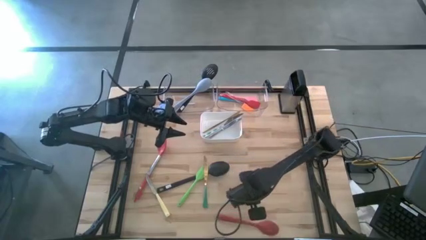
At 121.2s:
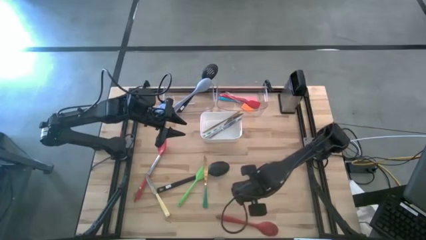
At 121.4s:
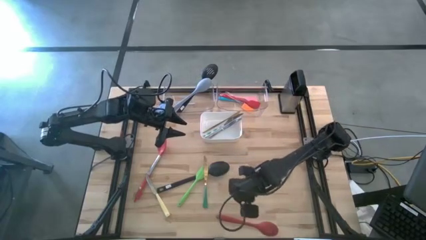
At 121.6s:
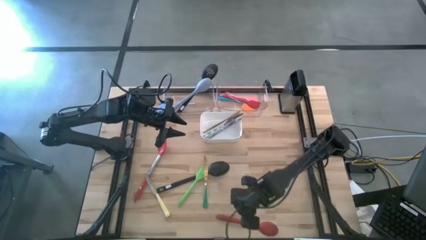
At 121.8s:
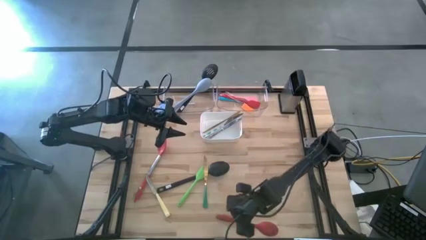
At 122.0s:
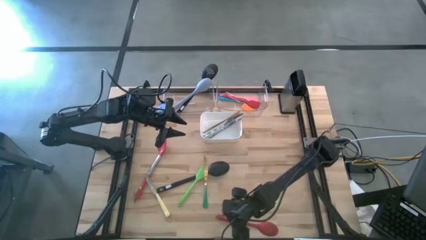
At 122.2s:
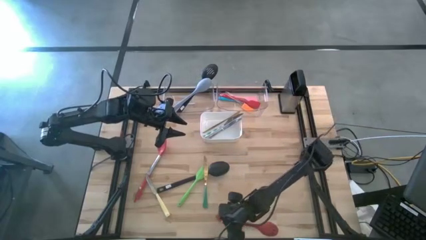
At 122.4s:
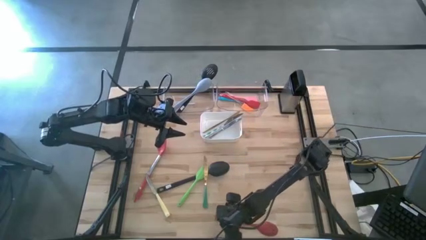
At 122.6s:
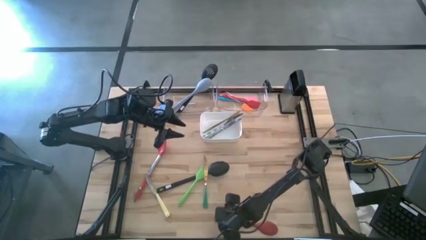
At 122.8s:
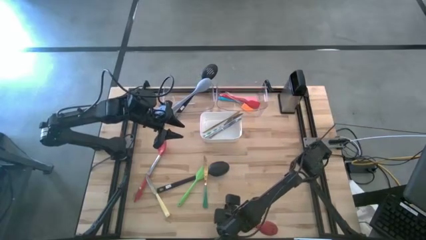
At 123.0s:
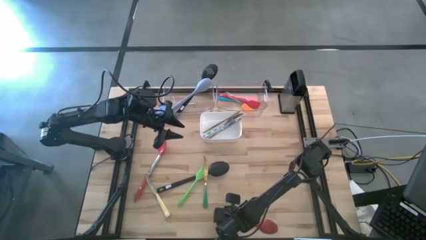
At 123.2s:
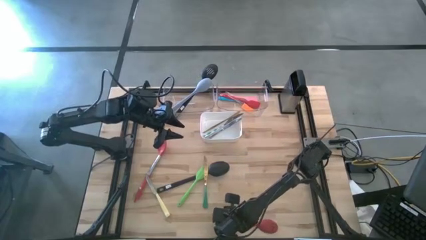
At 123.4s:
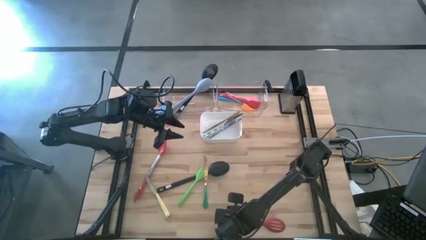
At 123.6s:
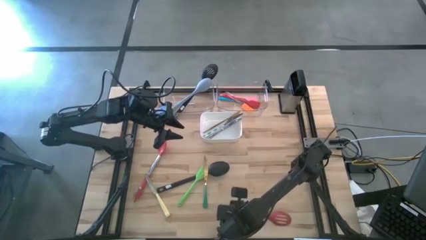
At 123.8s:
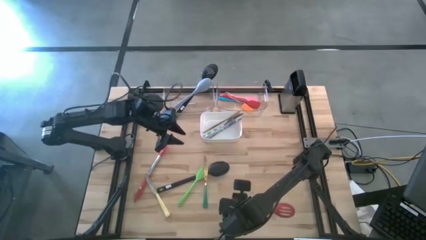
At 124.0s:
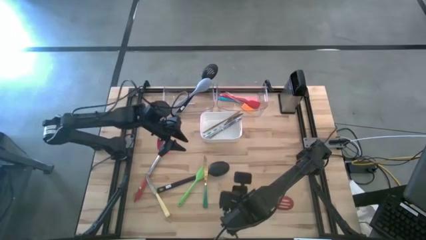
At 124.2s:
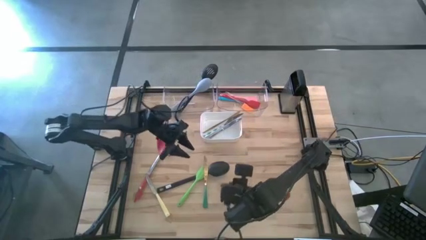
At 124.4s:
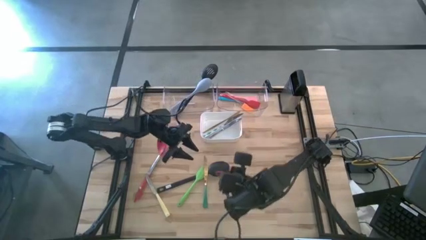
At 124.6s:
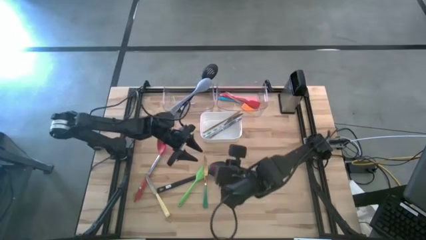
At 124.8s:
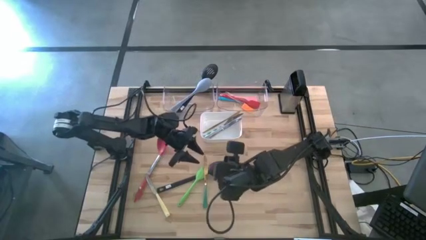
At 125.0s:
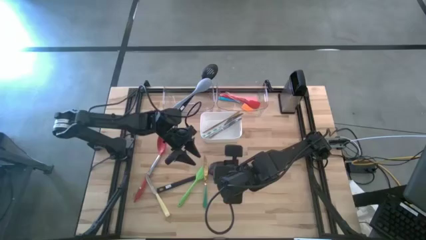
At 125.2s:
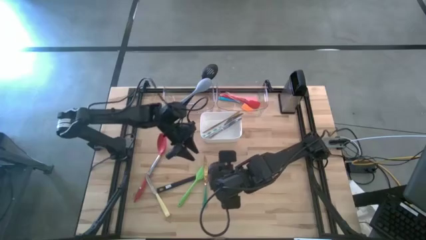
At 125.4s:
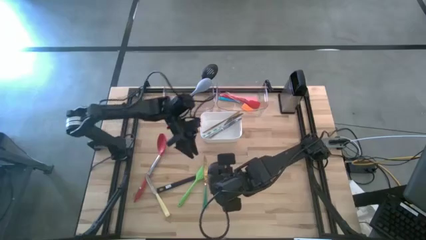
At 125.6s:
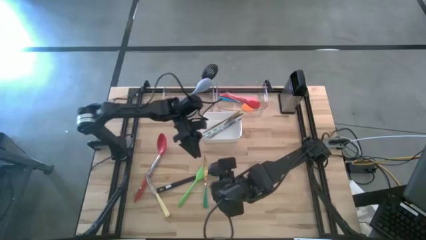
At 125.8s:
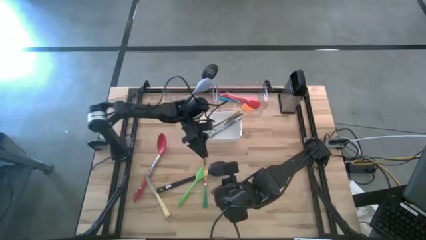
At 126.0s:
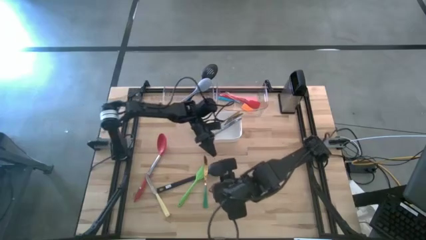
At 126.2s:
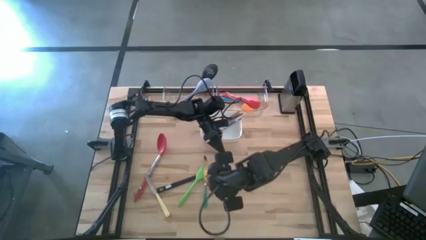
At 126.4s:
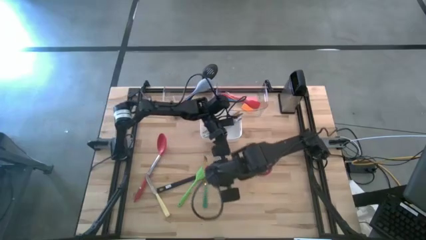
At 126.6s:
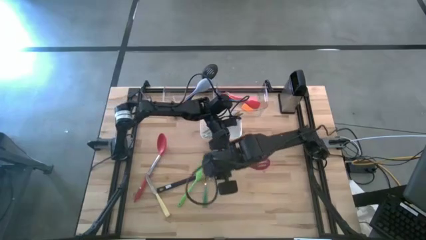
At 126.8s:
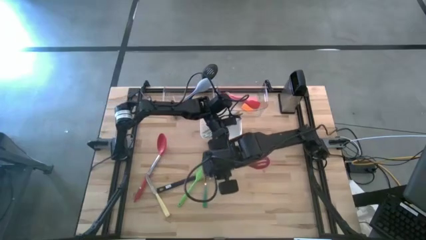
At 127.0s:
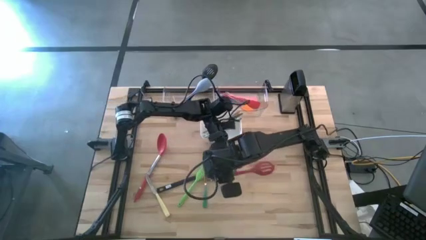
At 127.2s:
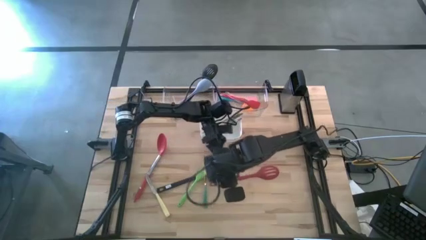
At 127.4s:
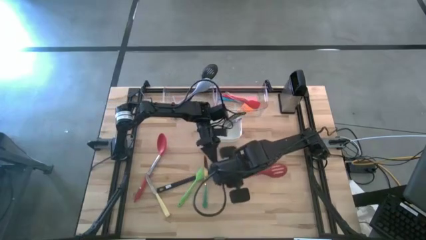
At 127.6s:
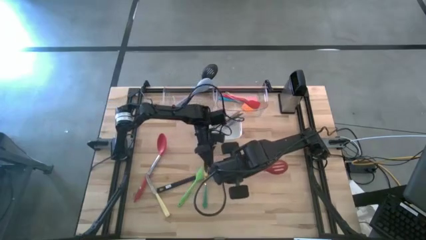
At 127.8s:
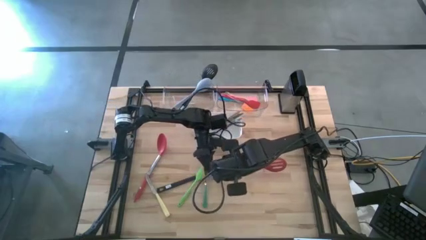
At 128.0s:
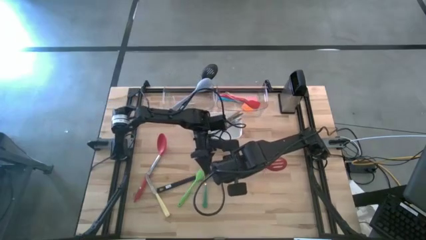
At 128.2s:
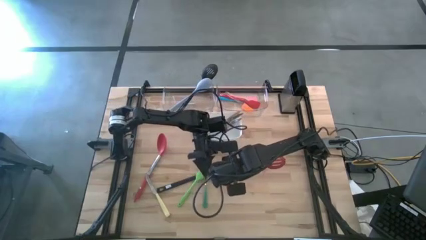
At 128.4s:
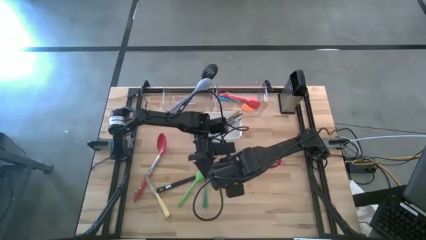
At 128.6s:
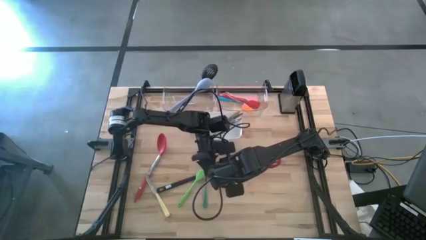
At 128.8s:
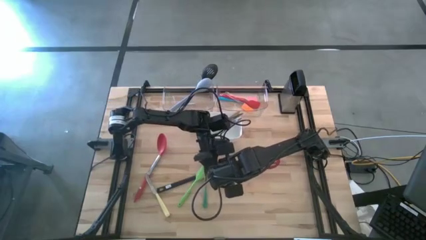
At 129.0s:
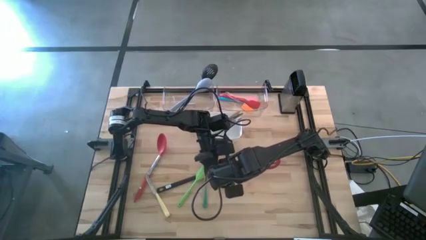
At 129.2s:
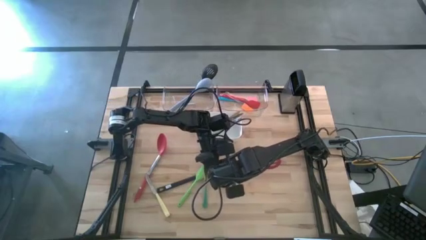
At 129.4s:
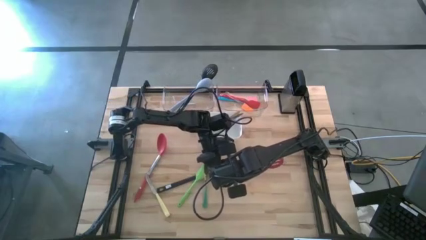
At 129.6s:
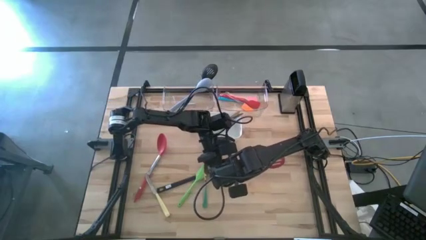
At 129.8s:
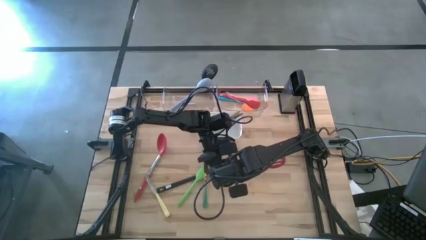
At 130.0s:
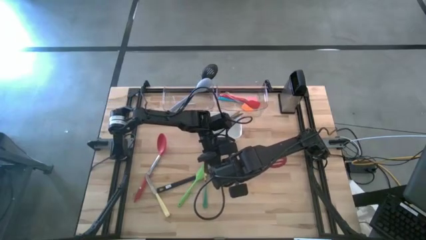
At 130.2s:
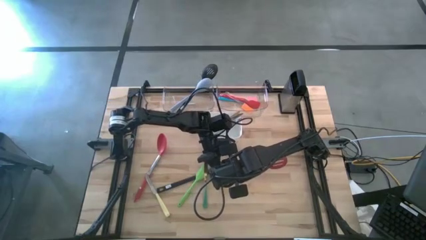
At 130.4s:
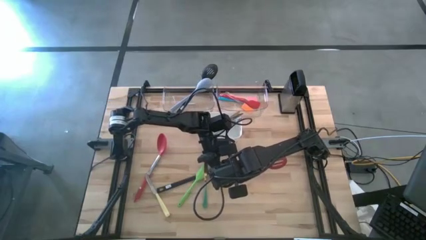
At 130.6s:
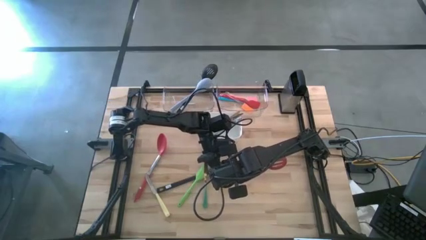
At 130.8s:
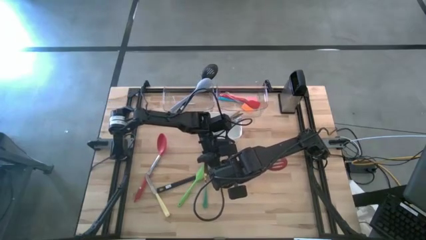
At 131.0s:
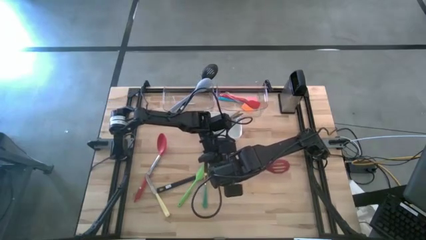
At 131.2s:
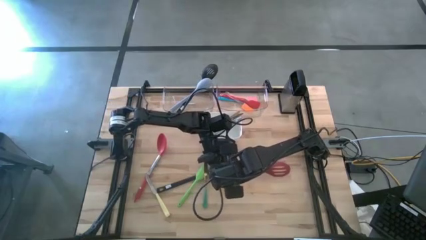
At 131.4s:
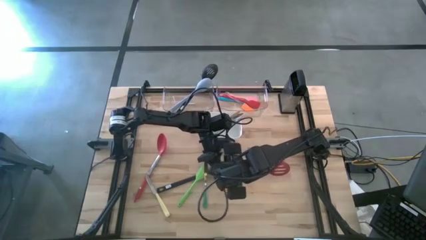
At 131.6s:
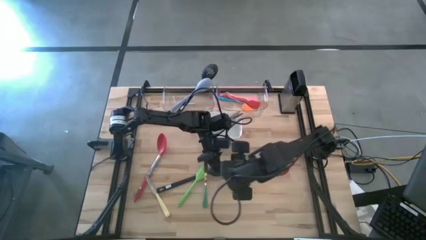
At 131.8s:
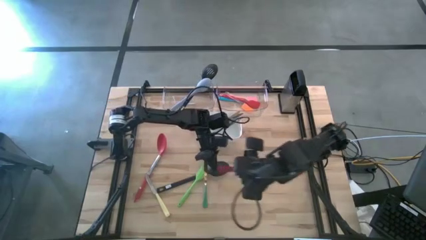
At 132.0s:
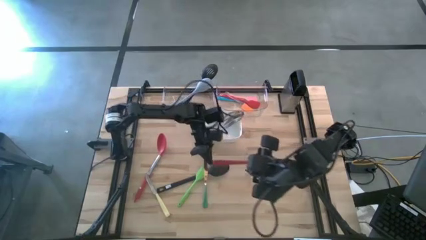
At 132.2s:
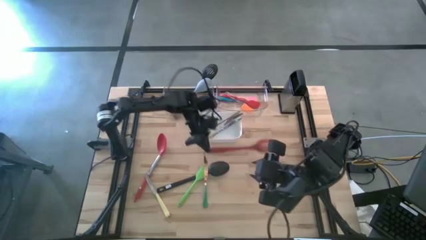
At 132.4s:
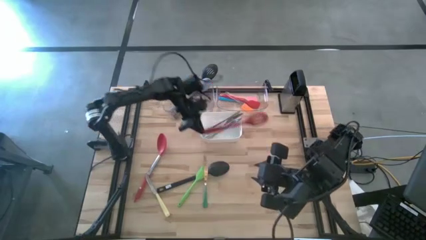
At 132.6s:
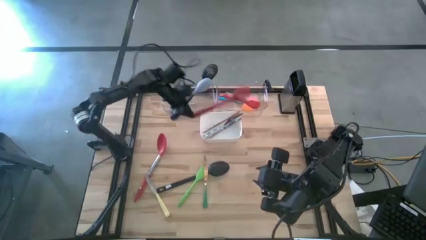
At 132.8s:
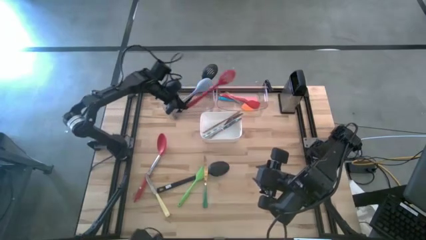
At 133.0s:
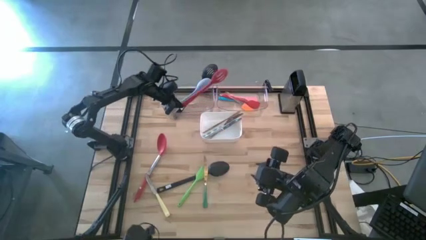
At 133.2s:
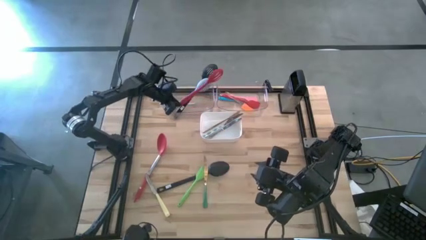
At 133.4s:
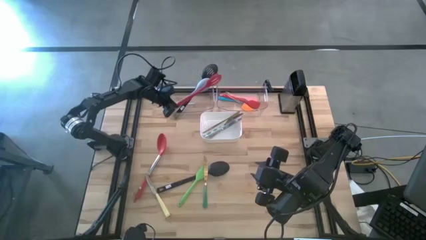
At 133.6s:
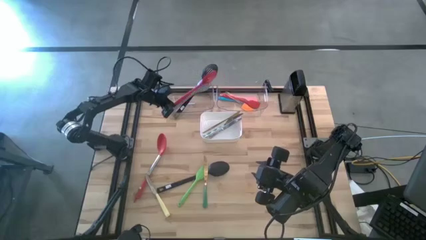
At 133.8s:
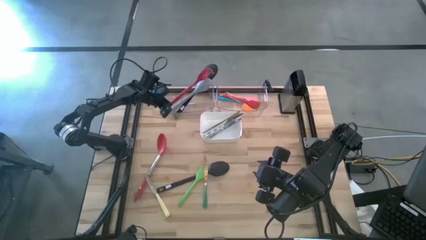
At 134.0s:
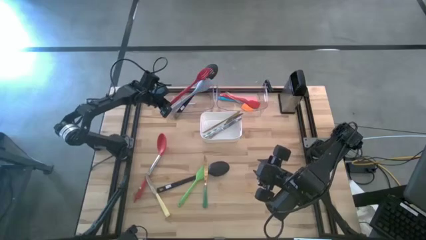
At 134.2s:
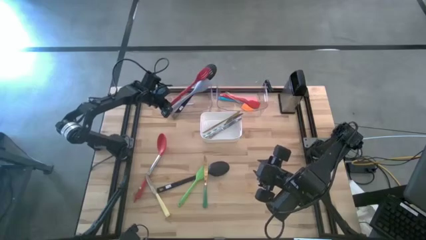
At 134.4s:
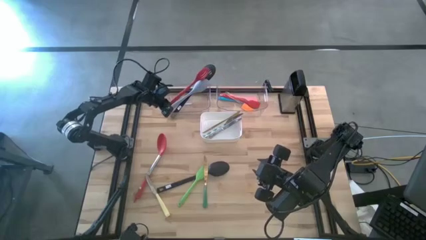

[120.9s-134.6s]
Task: Pick & Place Kitchen Items
Put the red serving spoon into the left transparent bin

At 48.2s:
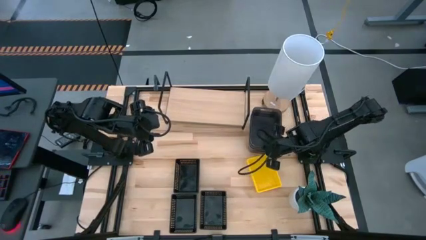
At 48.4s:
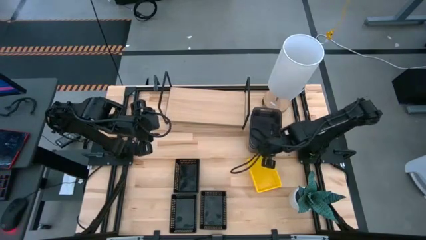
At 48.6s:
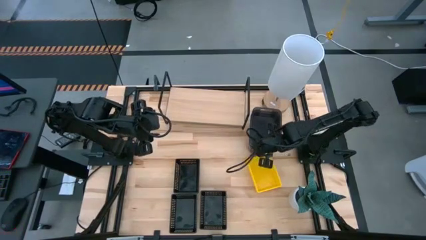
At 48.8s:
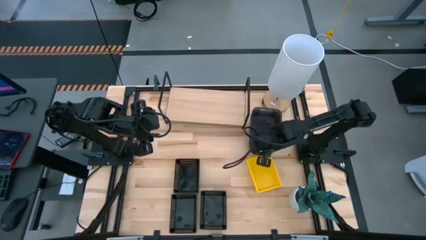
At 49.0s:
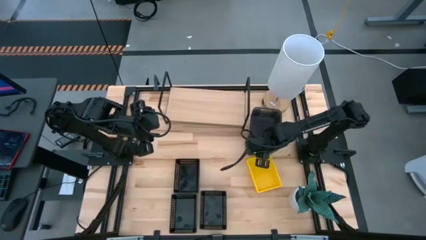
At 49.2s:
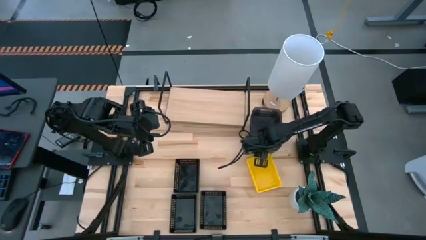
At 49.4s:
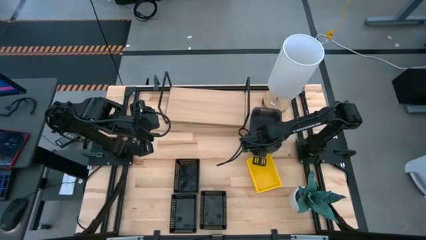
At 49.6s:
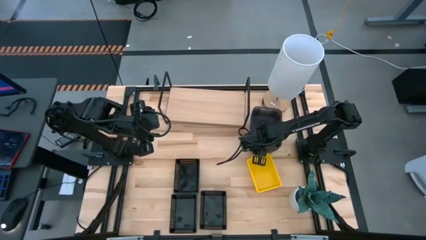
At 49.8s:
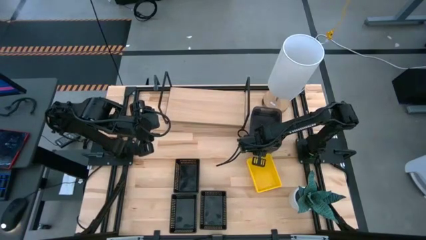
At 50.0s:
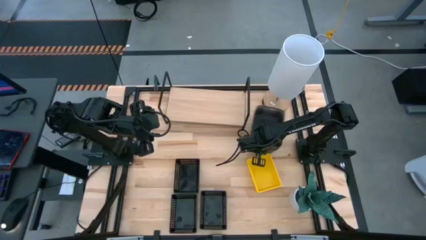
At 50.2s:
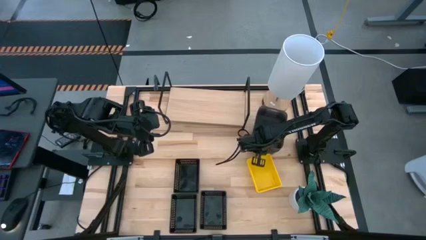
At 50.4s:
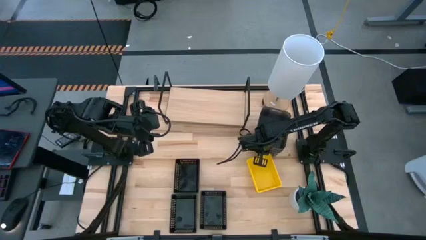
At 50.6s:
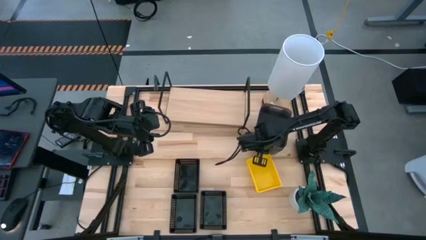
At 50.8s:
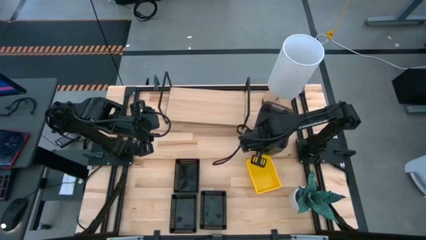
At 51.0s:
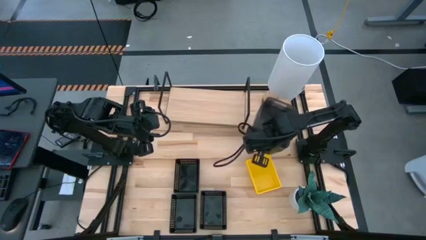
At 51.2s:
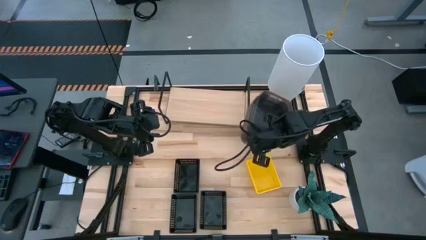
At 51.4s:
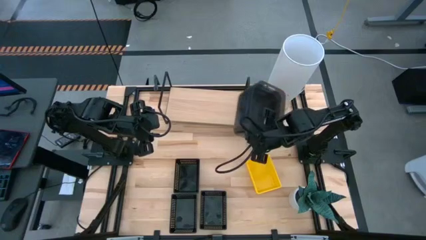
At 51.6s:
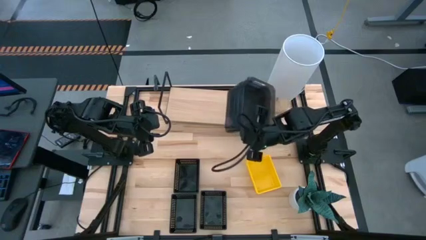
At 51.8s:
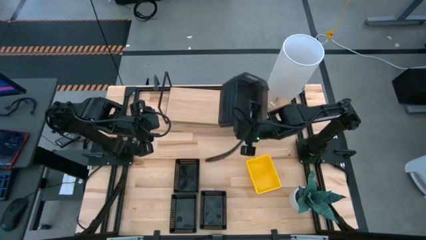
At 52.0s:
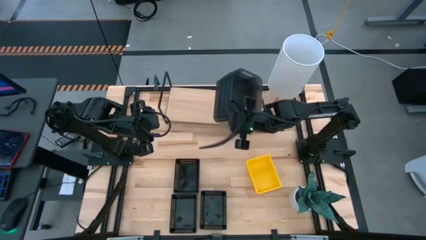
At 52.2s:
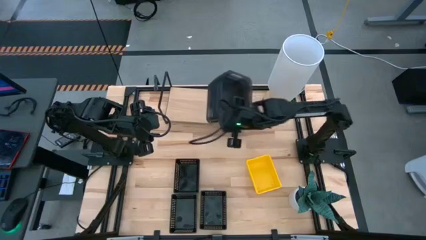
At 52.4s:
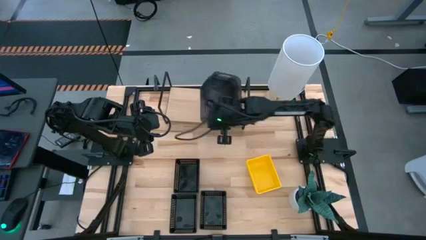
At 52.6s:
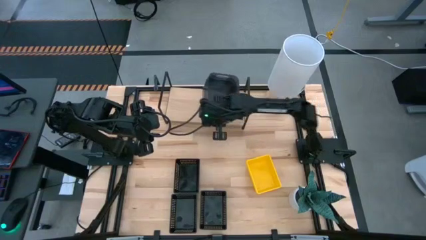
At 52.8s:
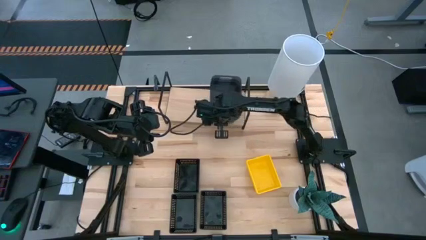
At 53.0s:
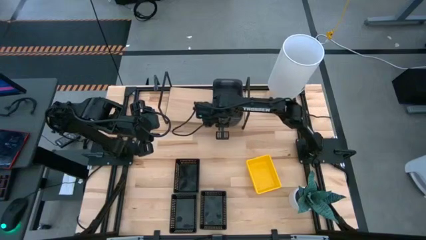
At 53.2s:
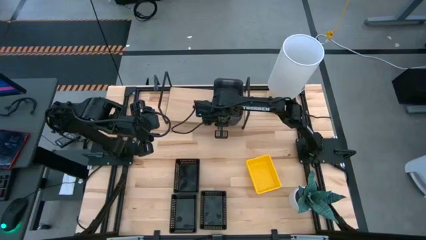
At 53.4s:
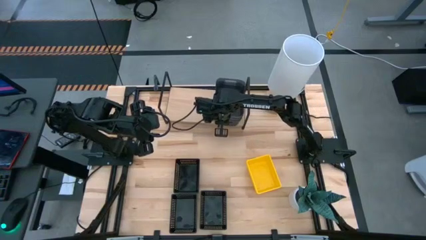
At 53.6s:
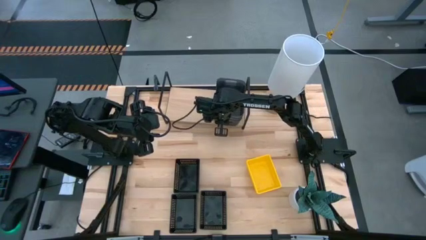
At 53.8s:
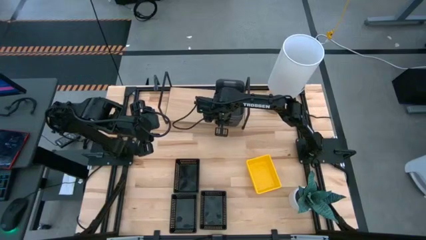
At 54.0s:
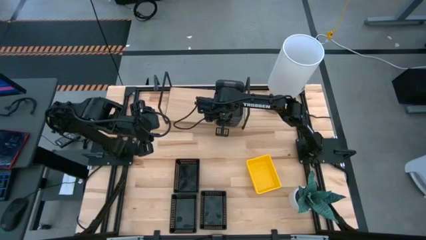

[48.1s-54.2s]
Task: Stack baskets on shelf by color
Put the stacked black transparent bins on the shelf
